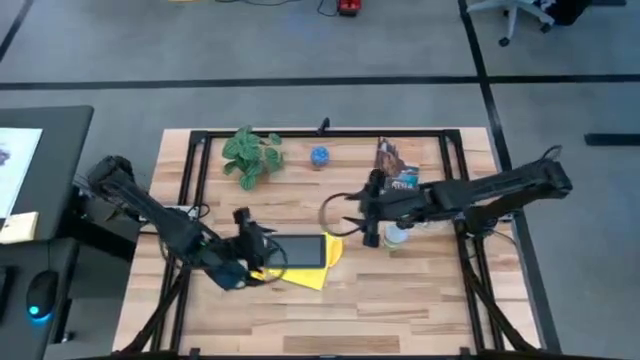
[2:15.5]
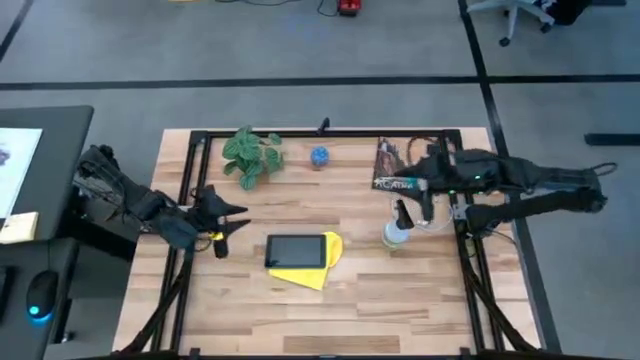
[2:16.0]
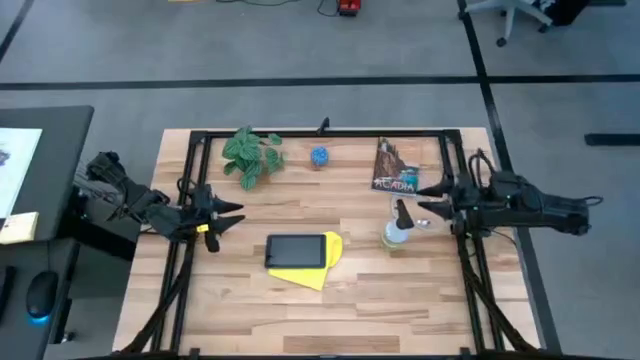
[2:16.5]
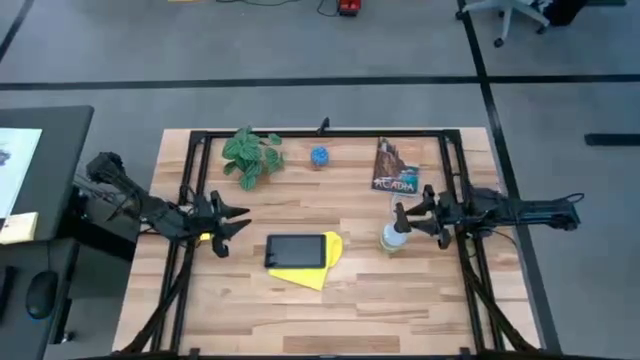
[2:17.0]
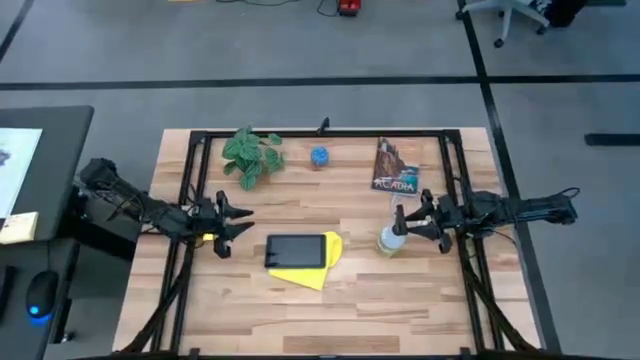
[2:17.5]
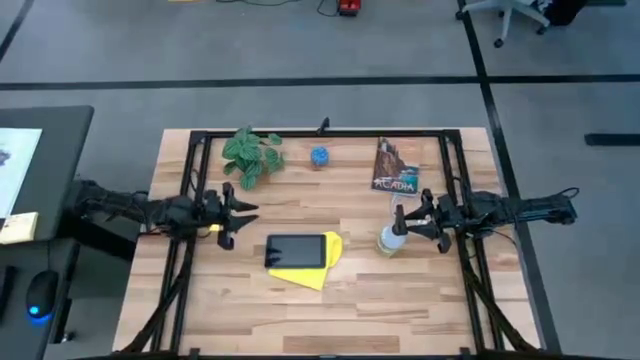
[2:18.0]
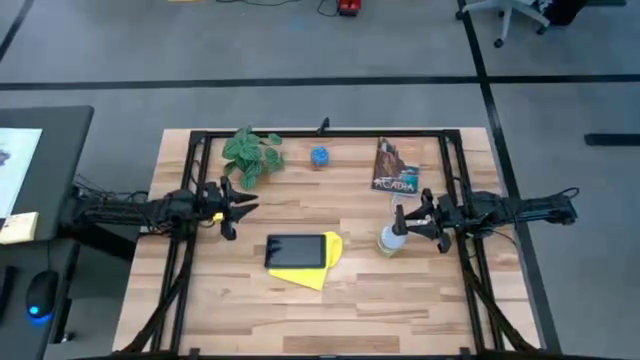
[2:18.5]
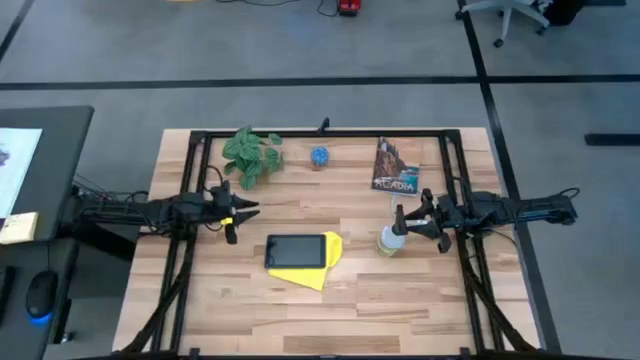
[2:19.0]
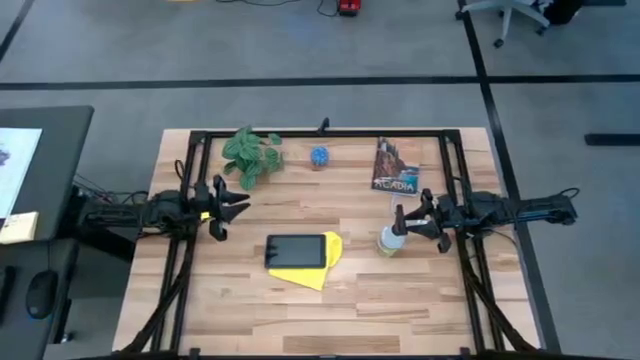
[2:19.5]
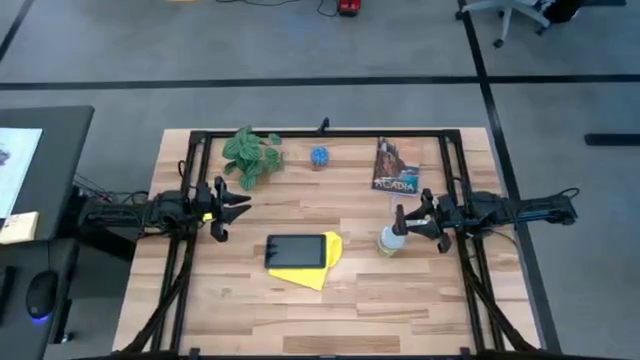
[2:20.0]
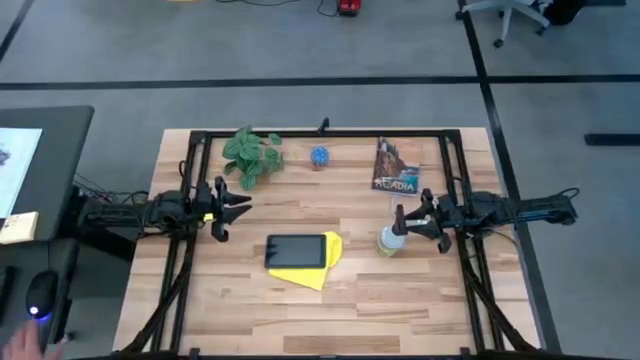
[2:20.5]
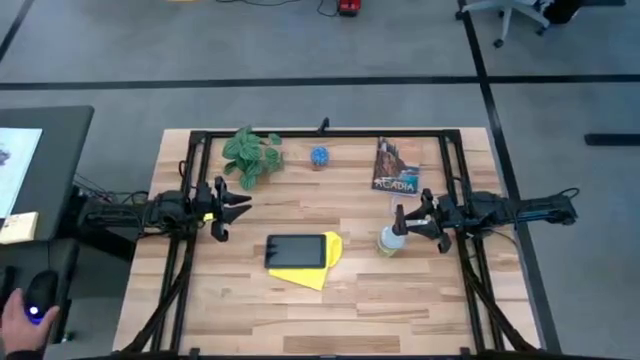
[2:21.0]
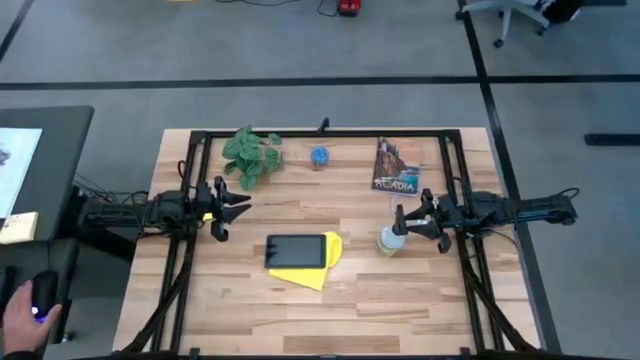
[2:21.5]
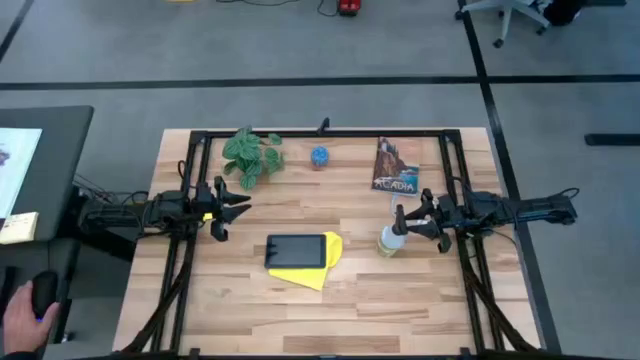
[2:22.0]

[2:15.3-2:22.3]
Task: Apply microfiber cloth
Return to Home Position

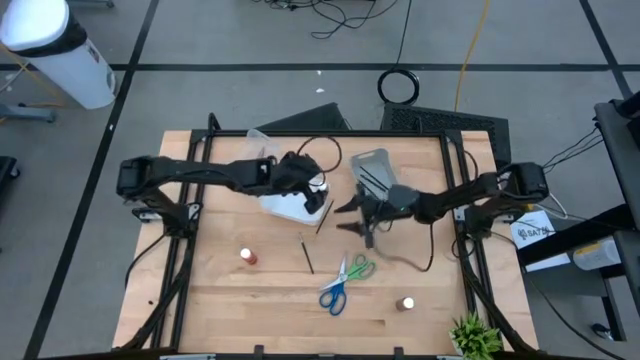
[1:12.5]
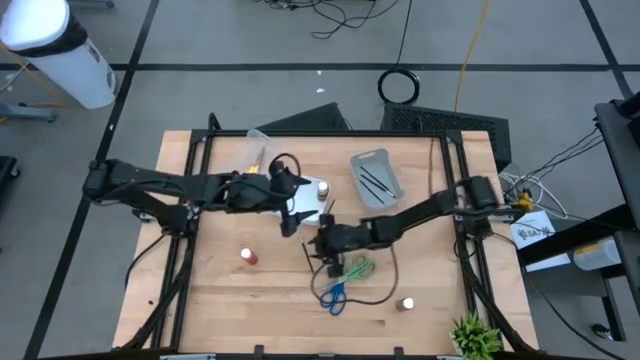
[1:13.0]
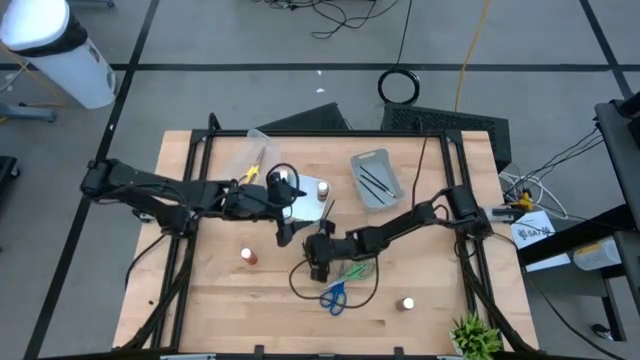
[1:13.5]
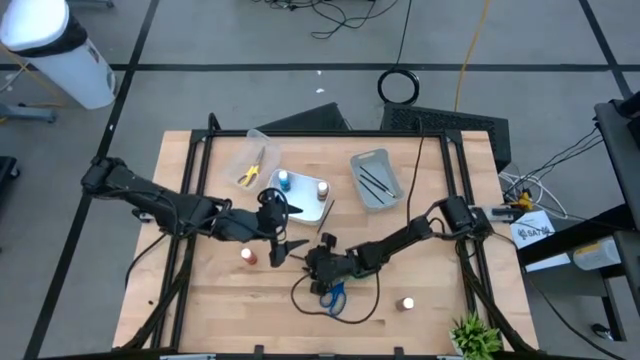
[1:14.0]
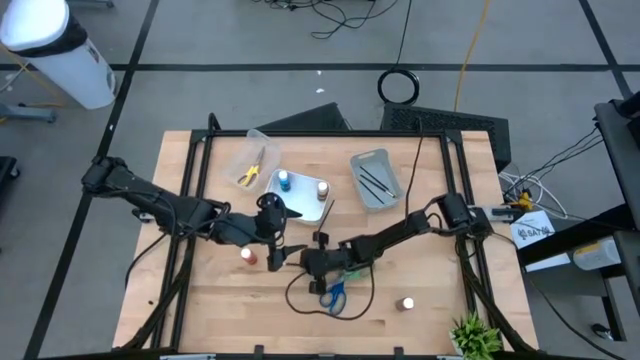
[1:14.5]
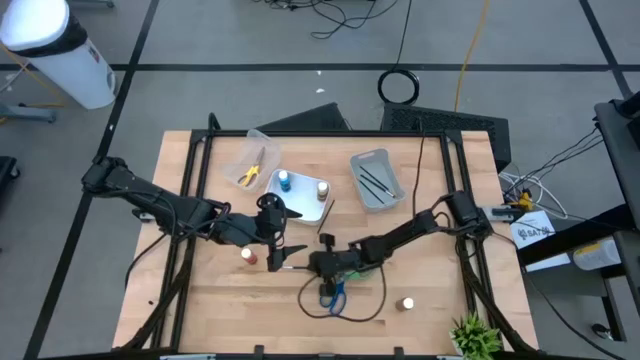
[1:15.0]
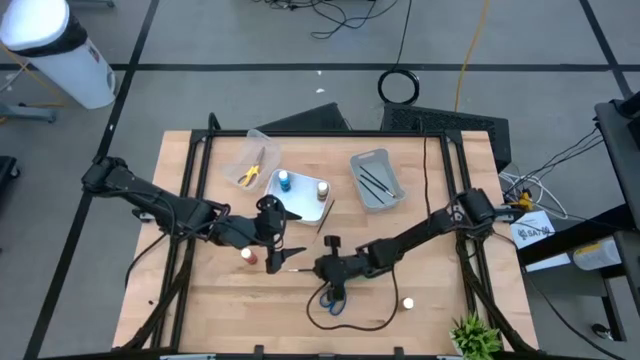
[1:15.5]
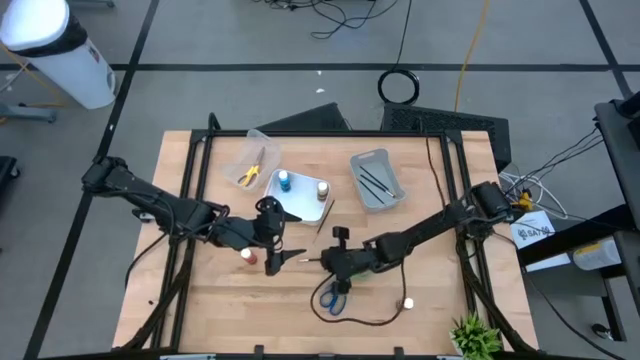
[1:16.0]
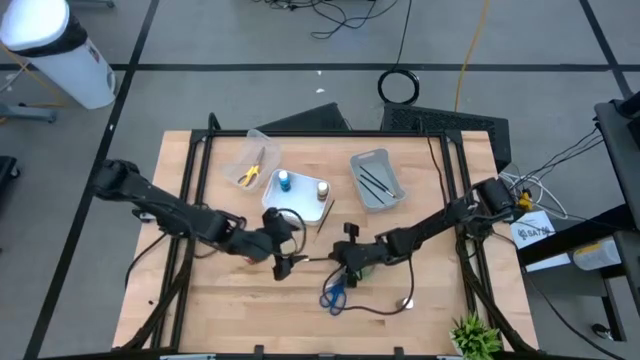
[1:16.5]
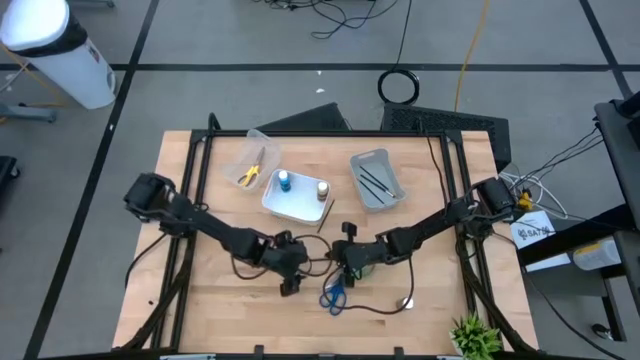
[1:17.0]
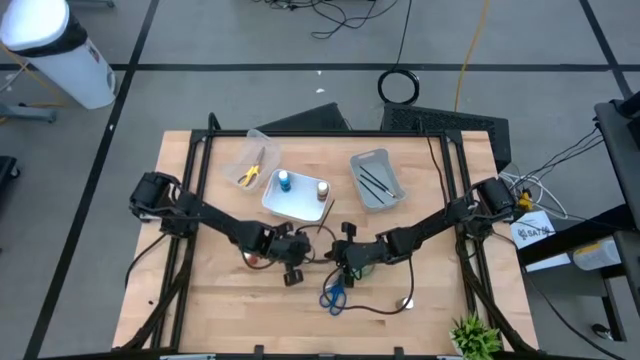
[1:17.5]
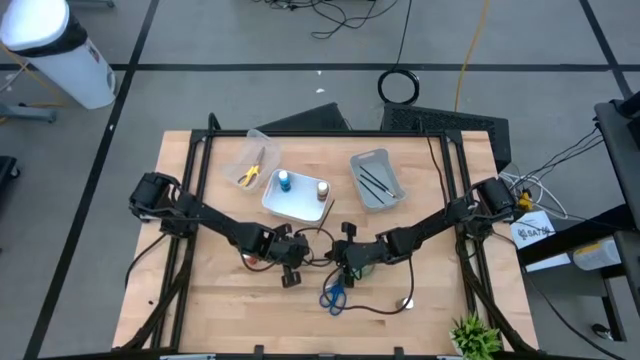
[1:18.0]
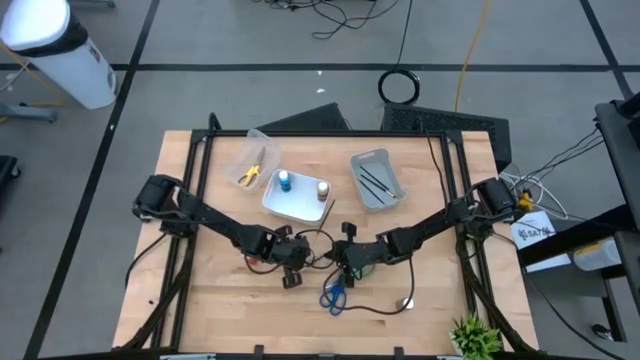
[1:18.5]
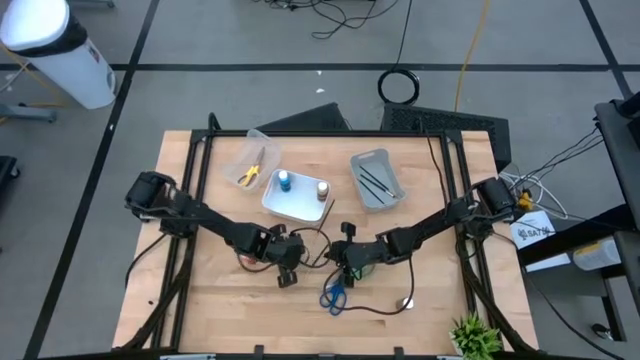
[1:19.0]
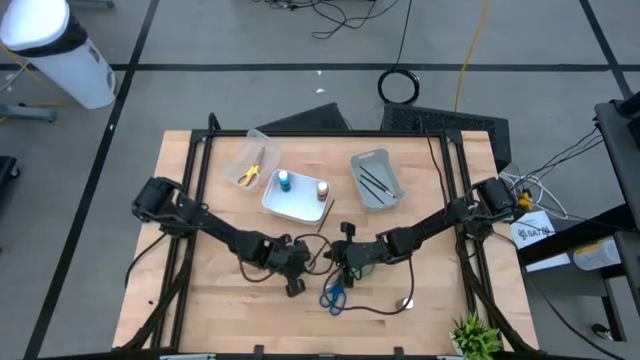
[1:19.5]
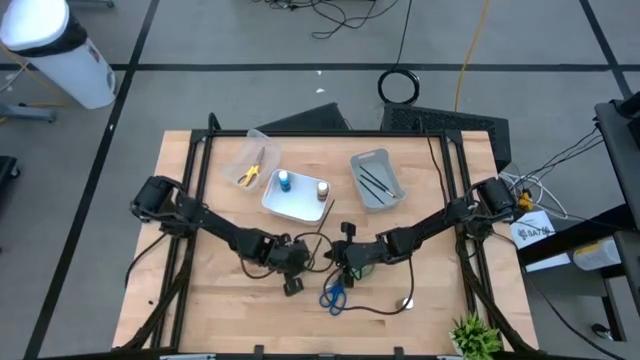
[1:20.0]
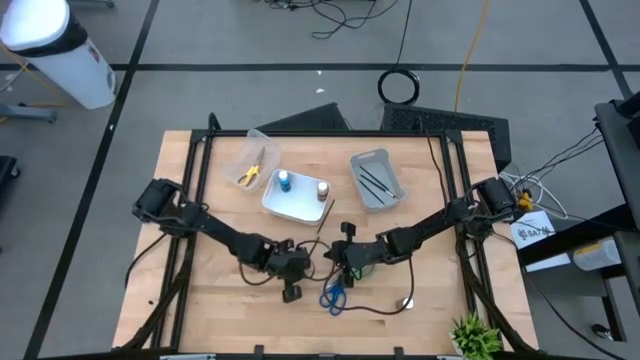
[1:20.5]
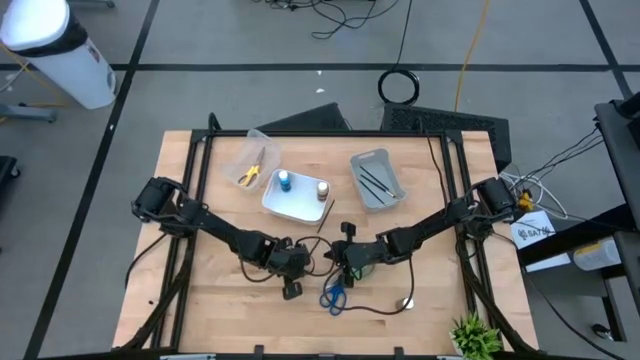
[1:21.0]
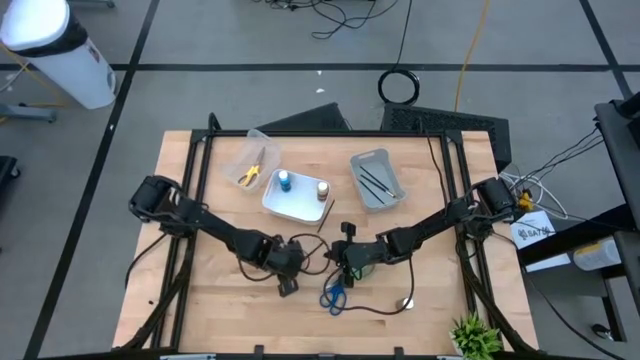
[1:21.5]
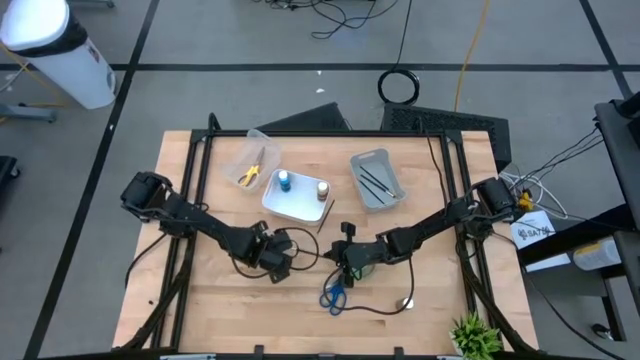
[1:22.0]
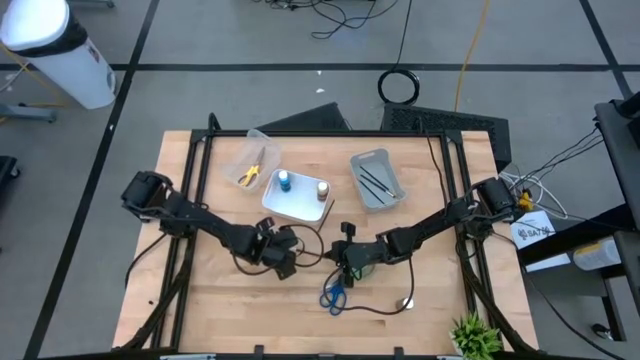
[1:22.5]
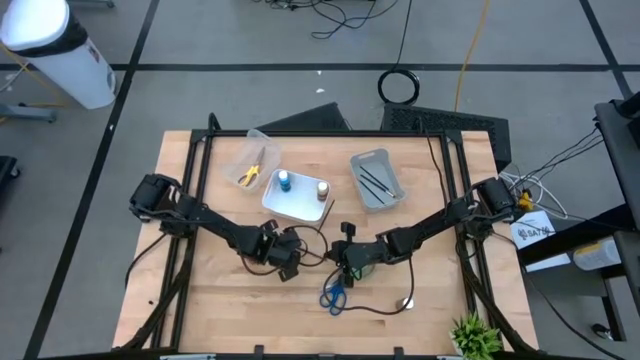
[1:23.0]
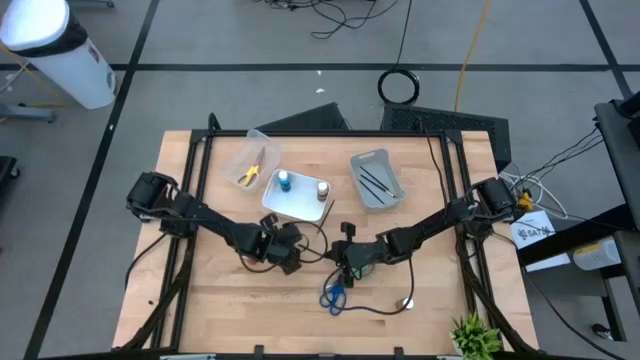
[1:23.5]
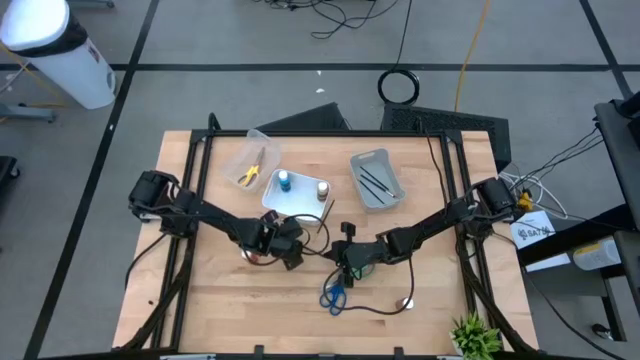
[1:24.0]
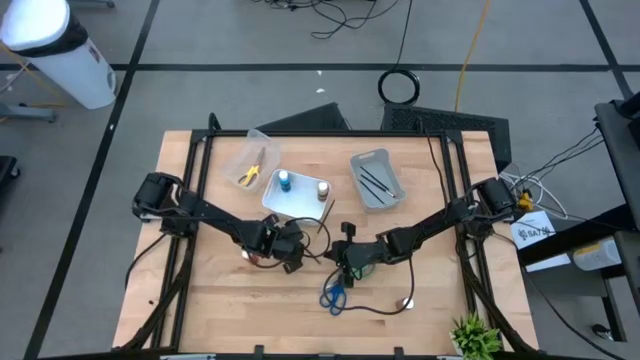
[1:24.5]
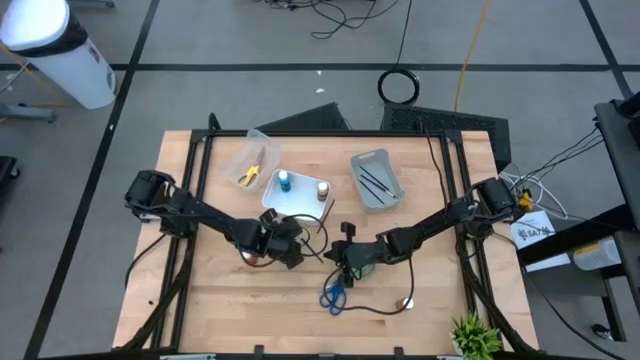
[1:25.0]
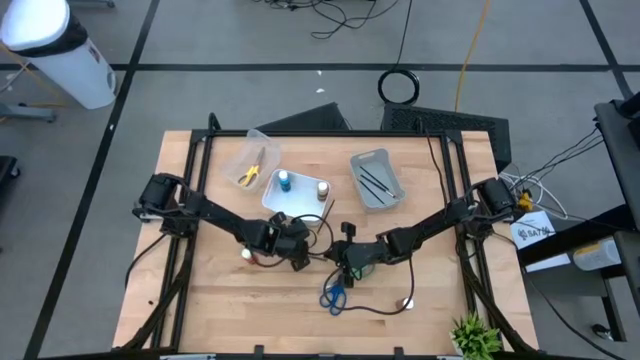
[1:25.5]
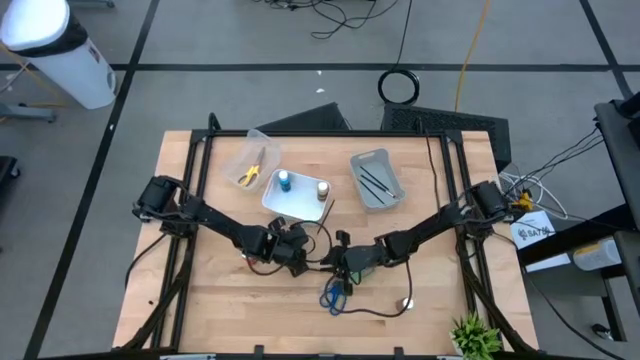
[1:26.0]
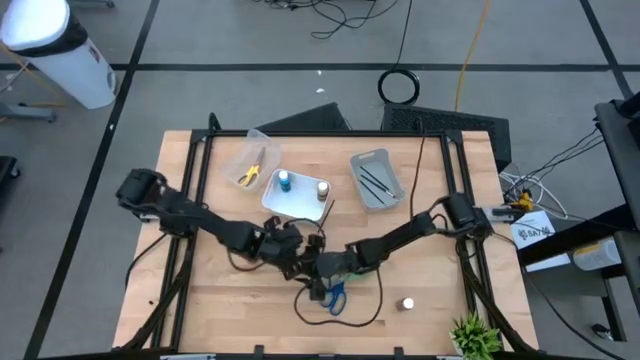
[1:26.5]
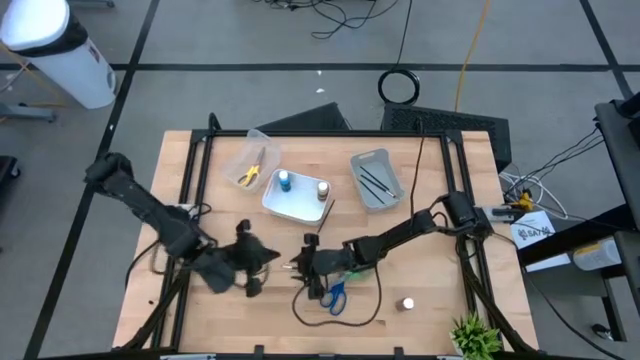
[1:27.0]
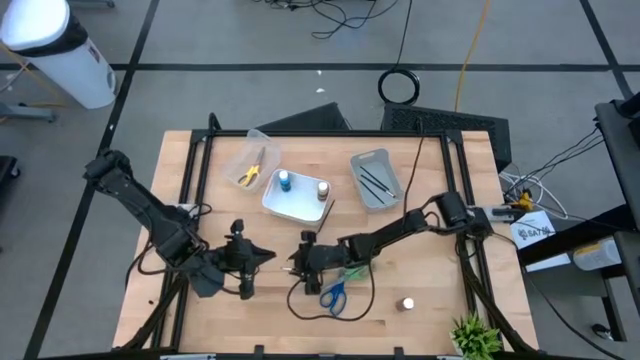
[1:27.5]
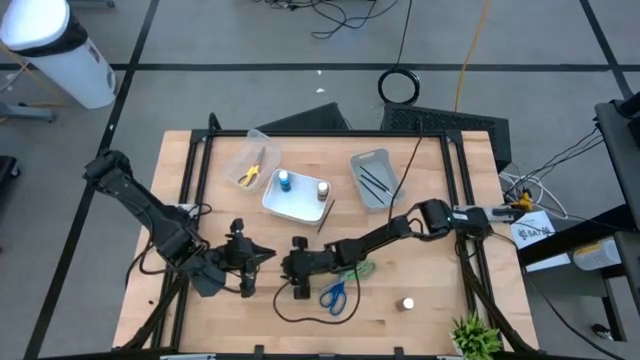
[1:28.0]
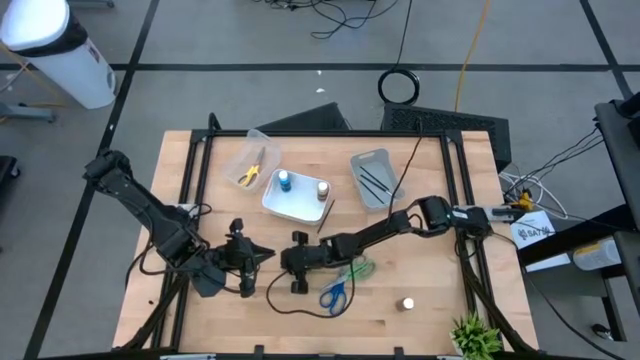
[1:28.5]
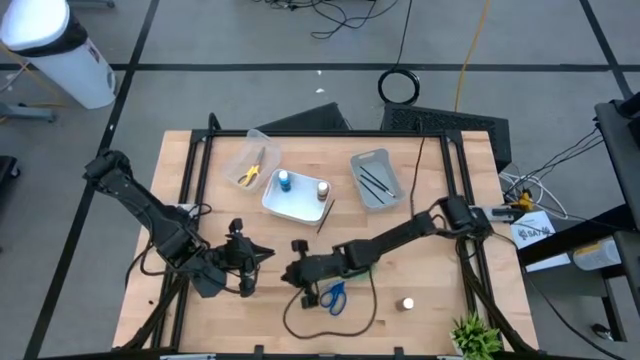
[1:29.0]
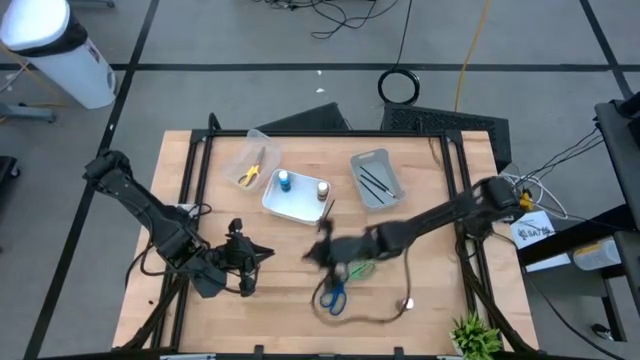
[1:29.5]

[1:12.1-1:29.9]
Task: Pick & Place Paint Supplies
Put the silver and black paintbrush into the gray bin
